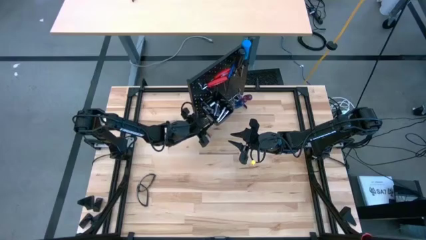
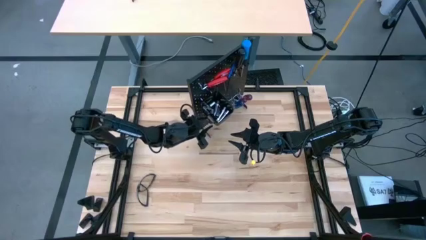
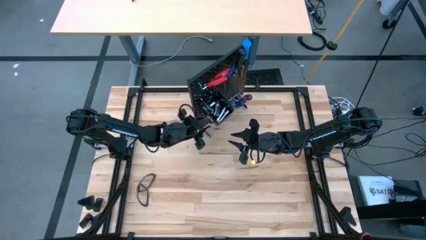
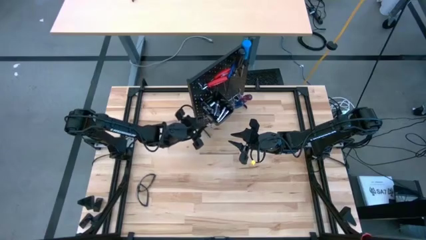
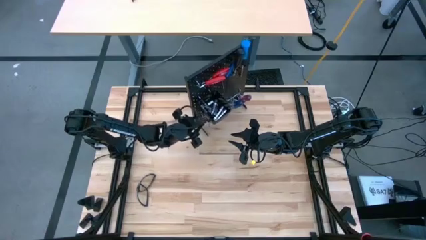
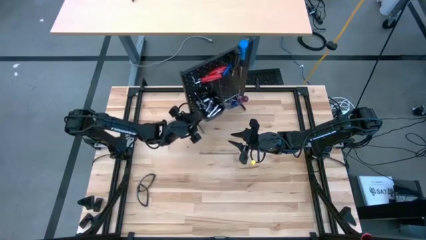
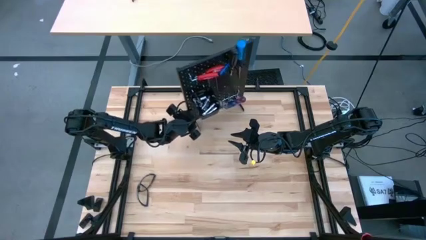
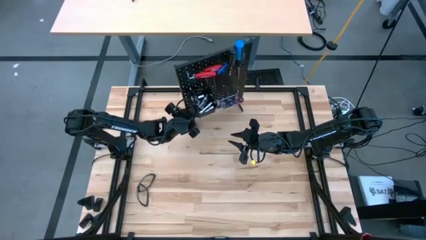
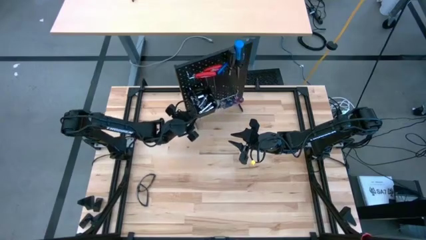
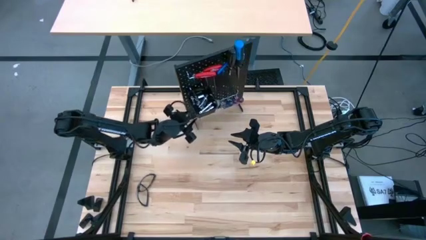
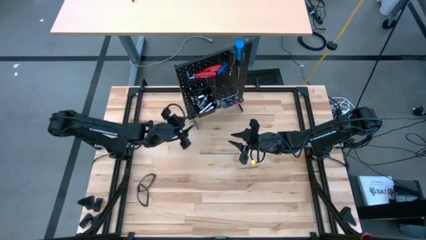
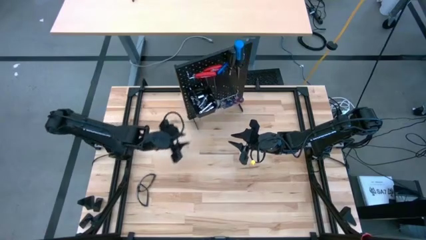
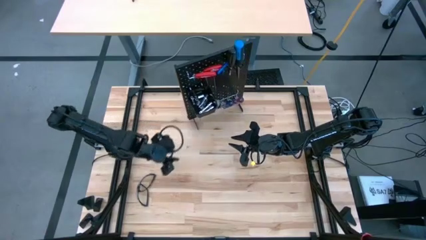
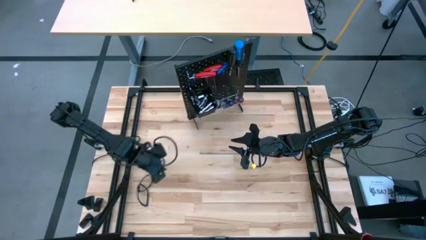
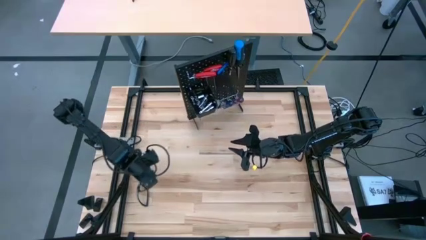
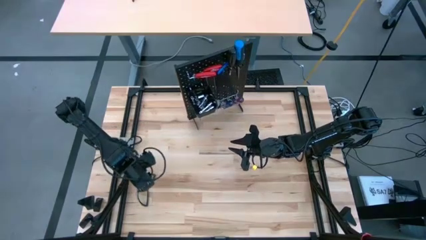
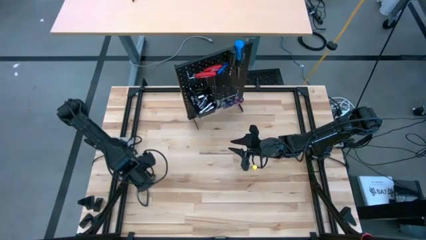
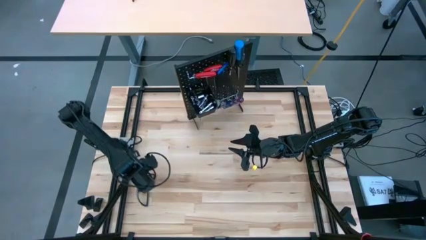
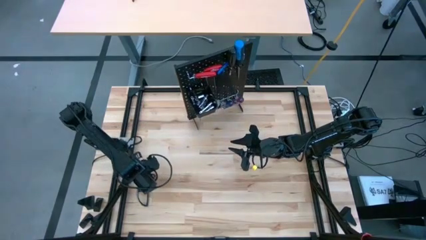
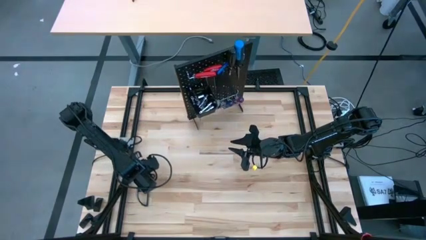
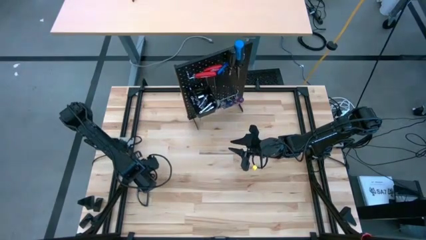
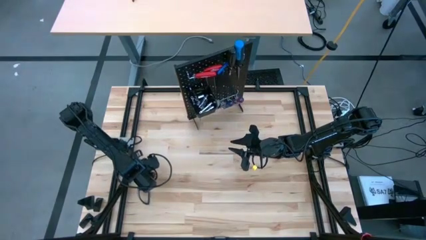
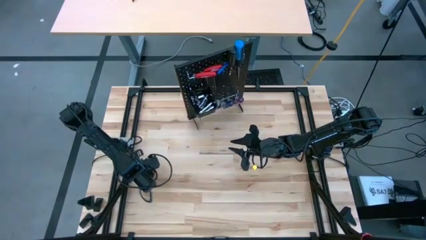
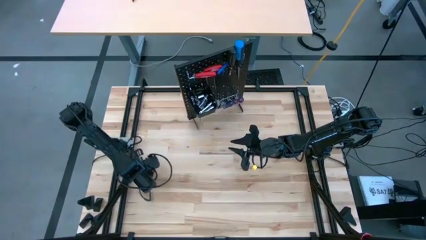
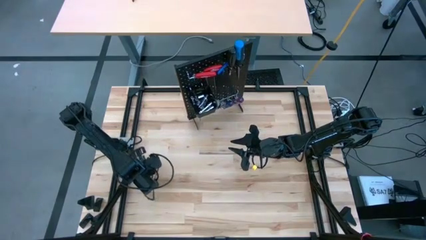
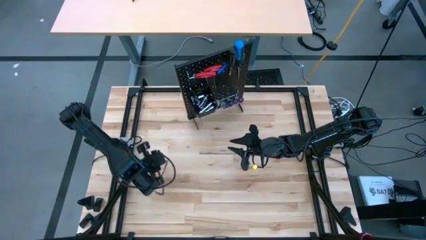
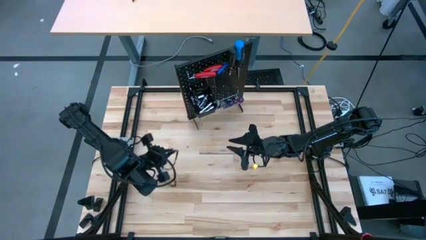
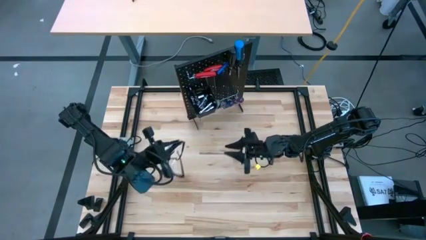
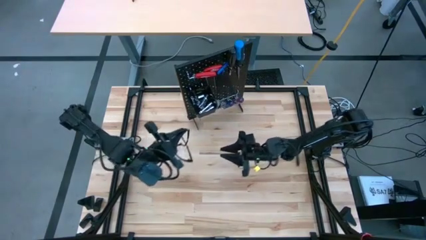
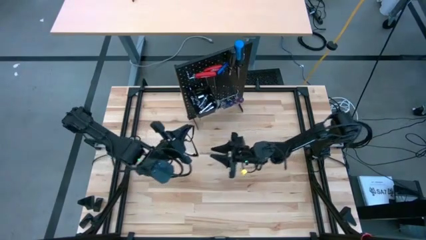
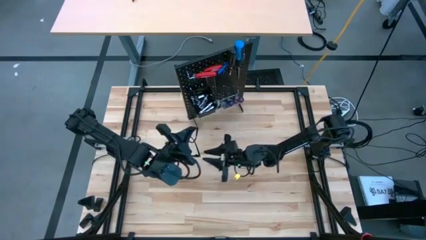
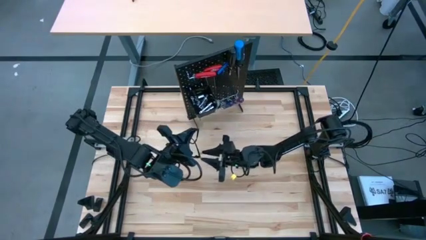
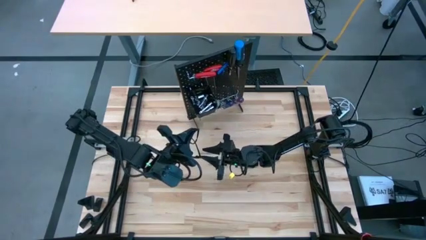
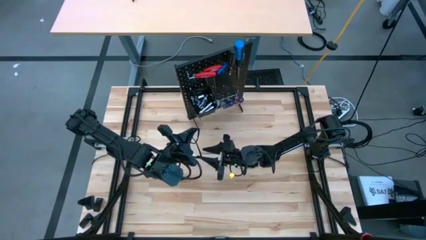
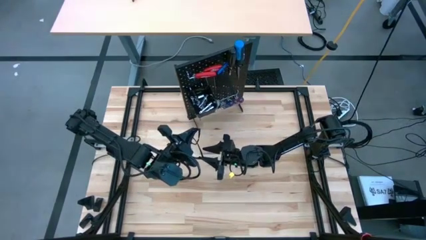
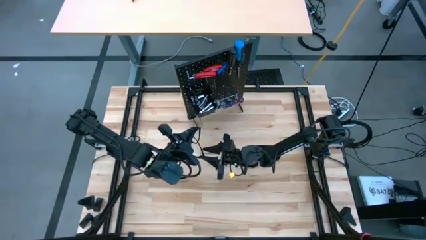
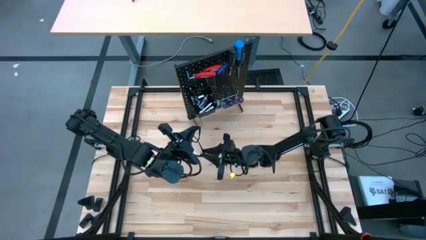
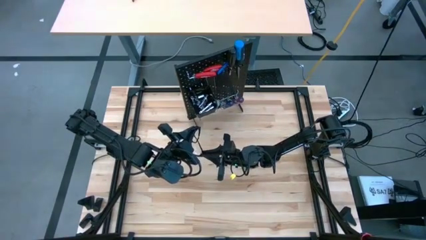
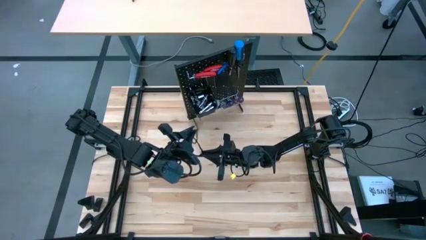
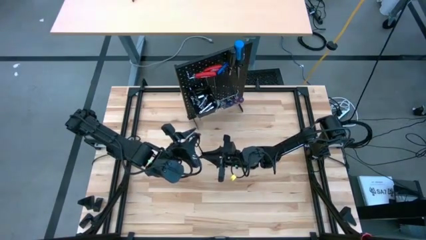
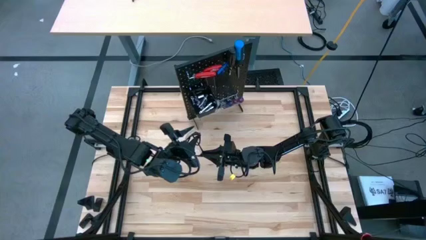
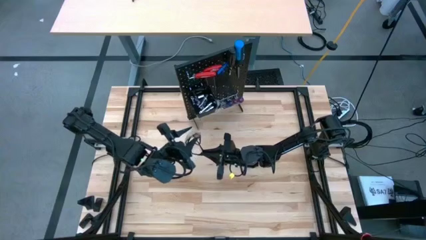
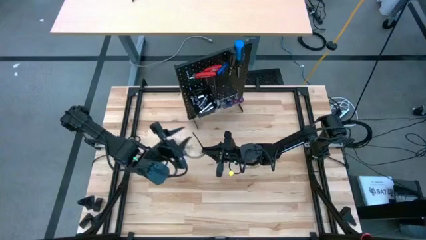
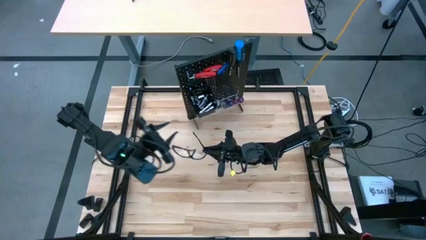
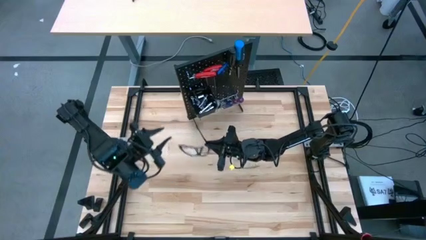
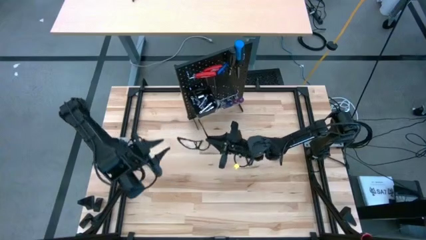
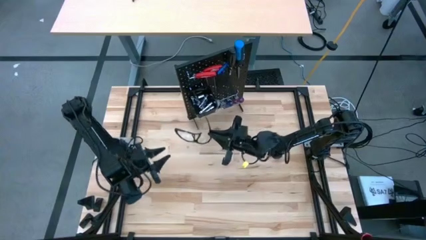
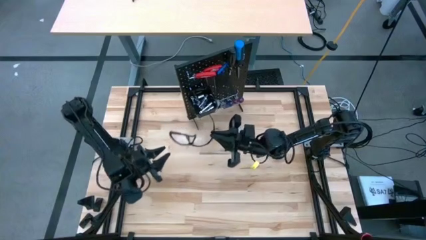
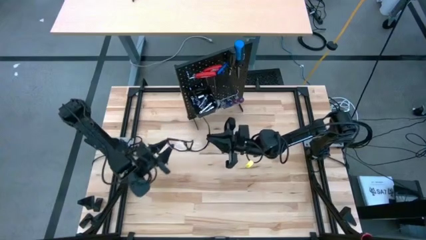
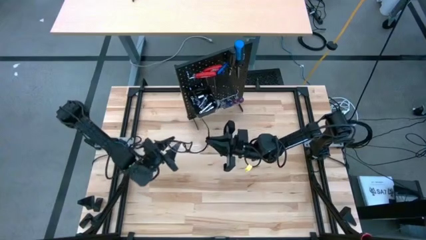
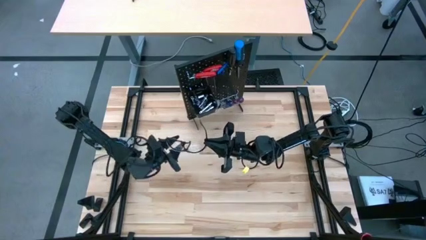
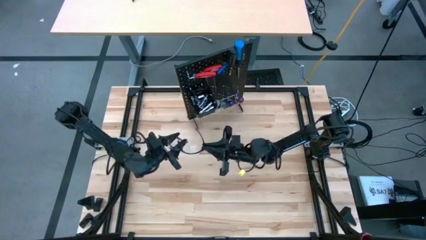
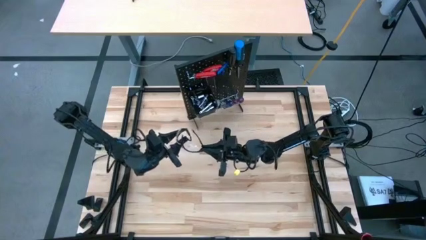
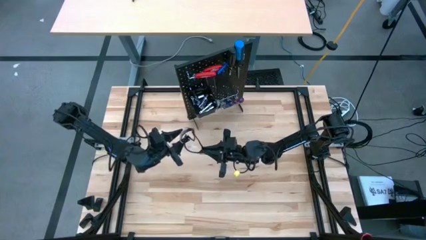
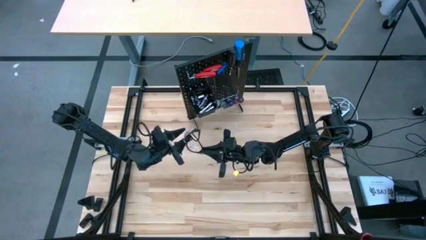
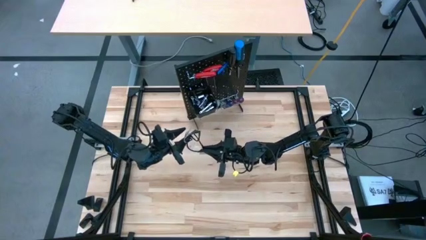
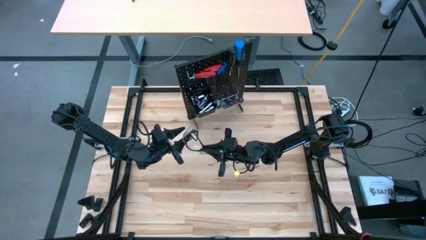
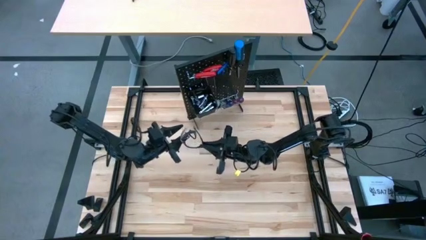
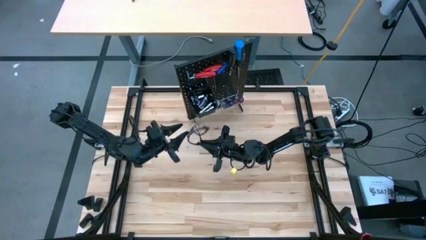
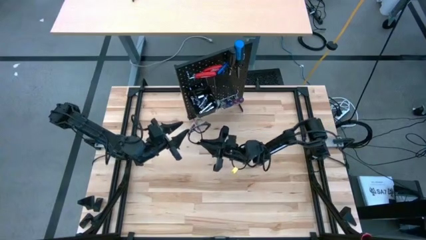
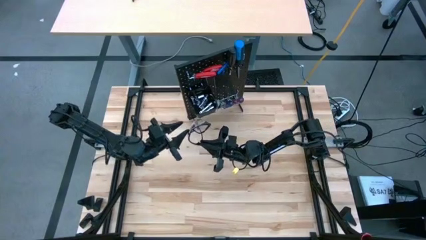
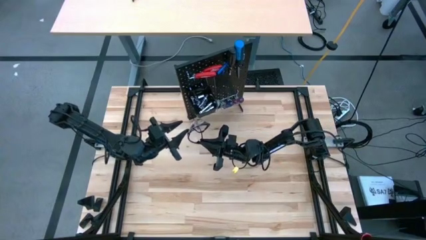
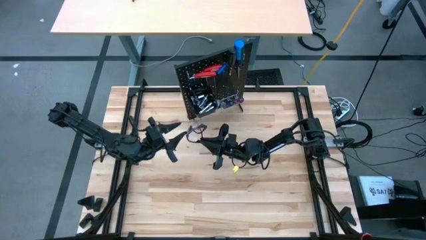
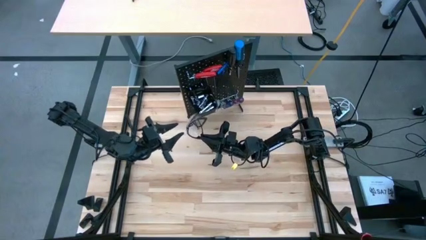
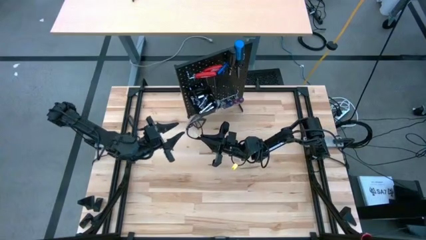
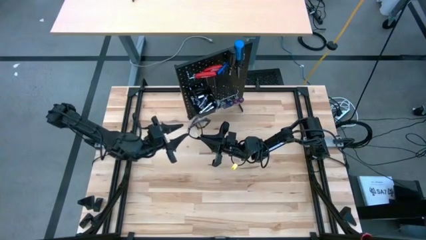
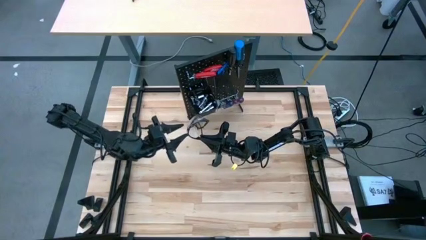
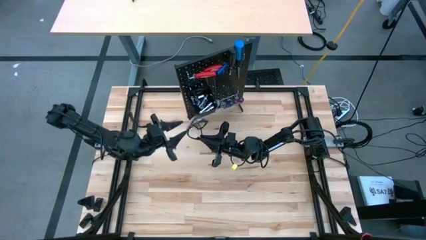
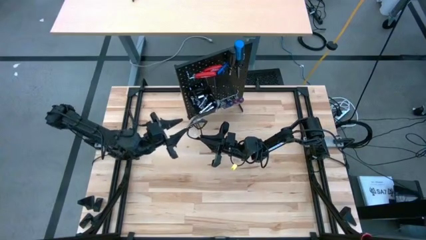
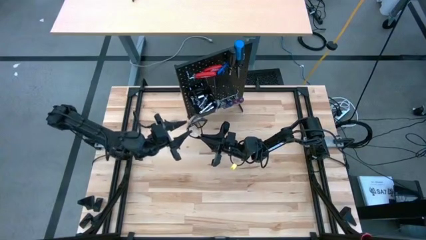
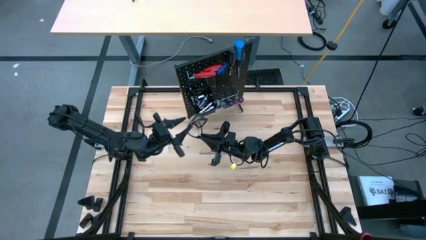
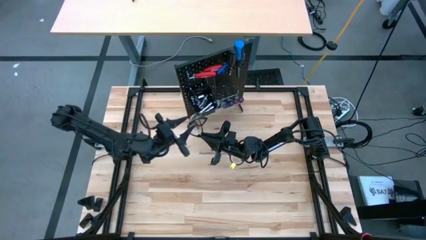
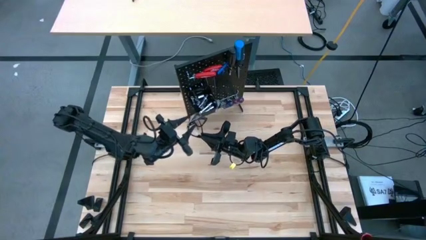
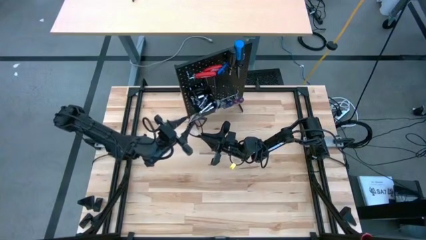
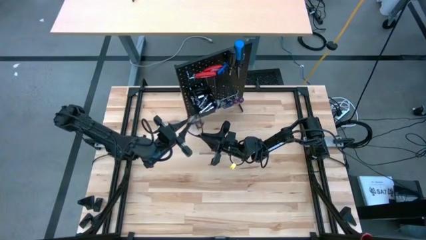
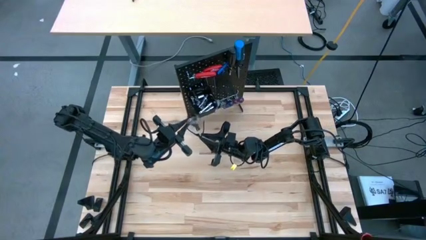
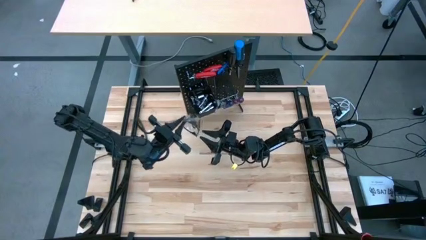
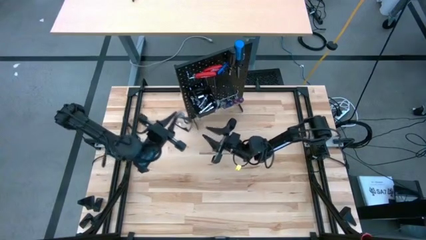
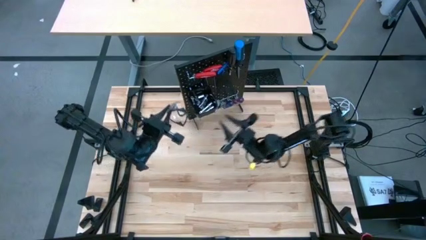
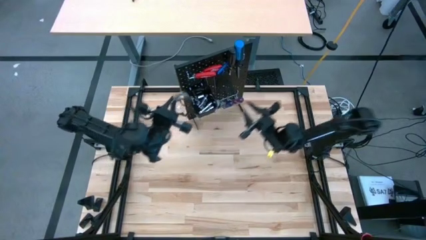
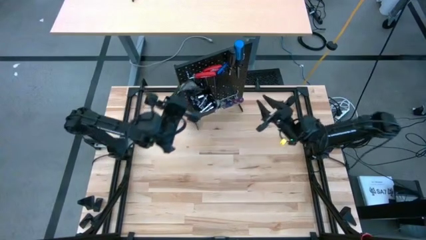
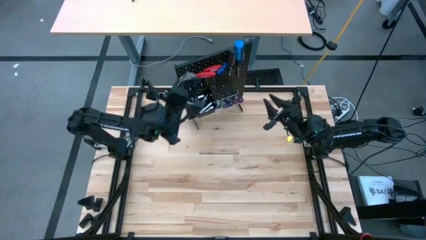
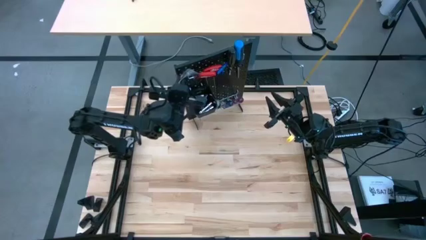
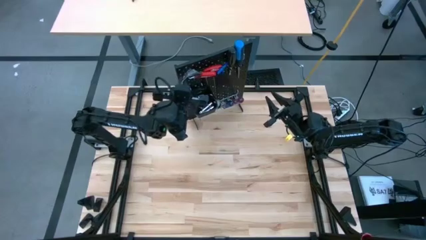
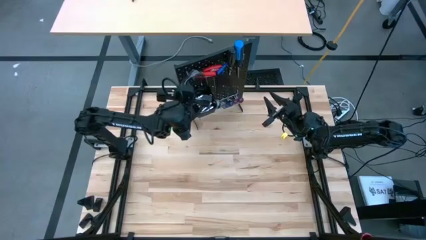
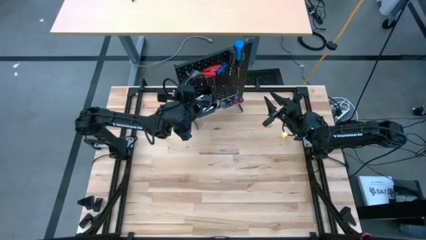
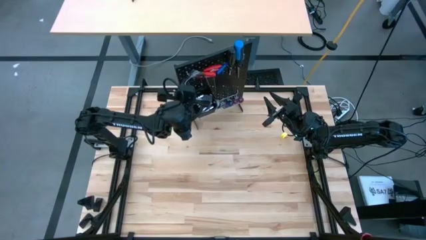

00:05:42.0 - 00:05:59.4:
Task: Hang tools onto peg board
Put the safety glass into the black bin on the pegboard
